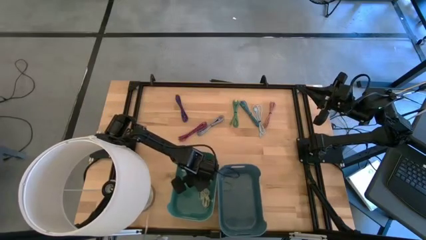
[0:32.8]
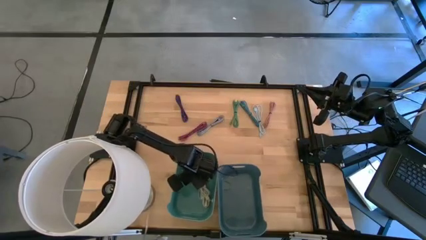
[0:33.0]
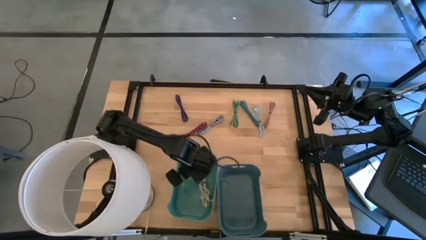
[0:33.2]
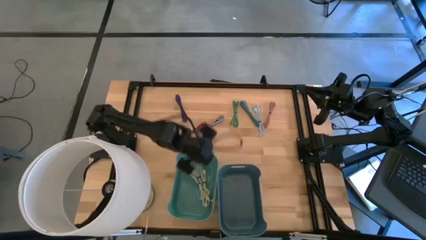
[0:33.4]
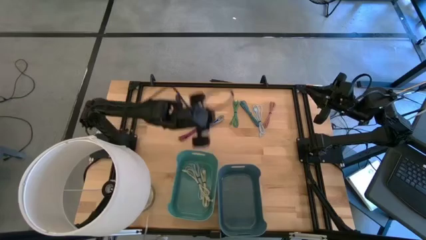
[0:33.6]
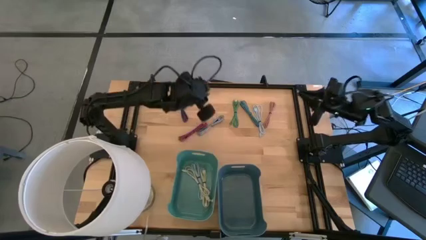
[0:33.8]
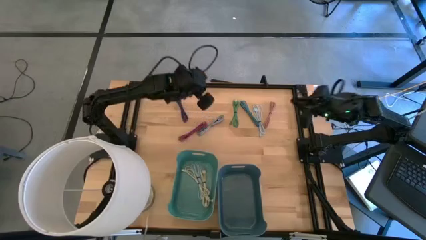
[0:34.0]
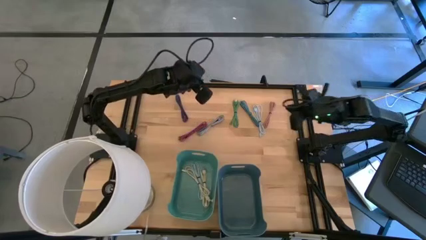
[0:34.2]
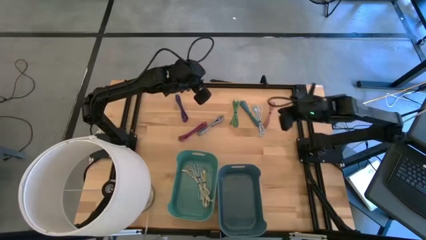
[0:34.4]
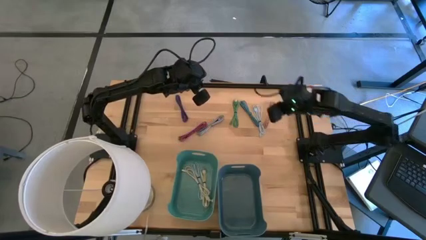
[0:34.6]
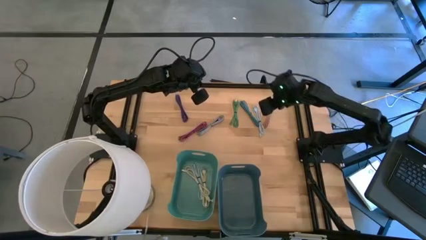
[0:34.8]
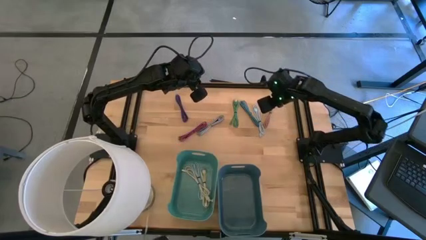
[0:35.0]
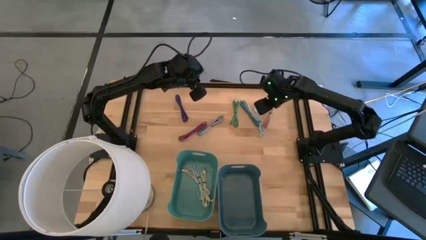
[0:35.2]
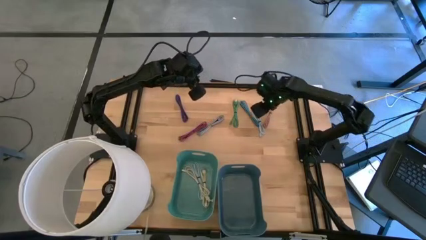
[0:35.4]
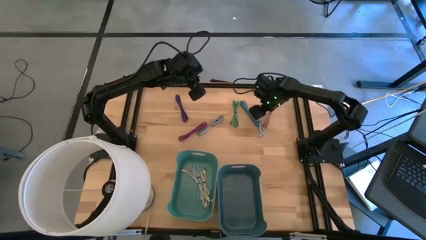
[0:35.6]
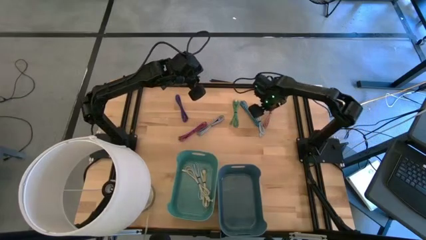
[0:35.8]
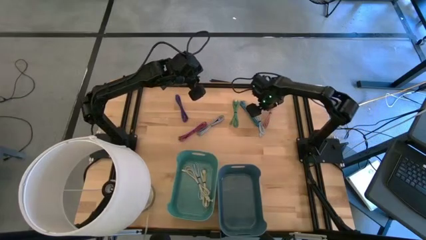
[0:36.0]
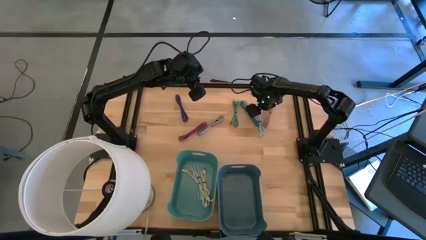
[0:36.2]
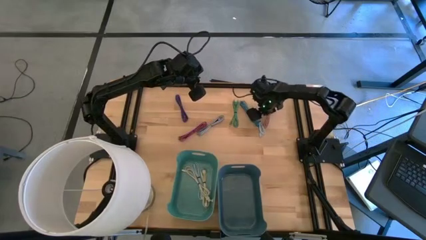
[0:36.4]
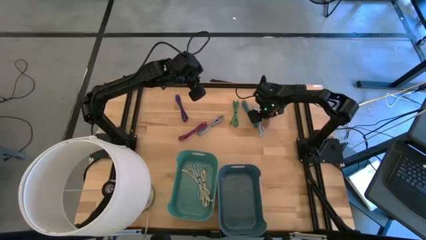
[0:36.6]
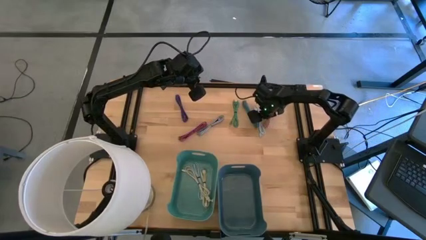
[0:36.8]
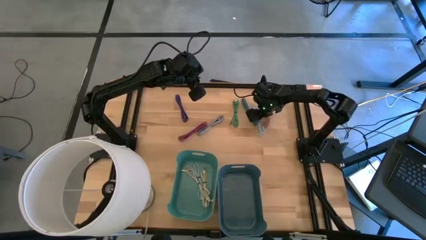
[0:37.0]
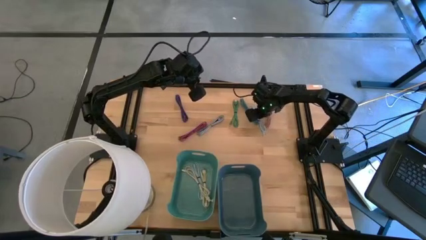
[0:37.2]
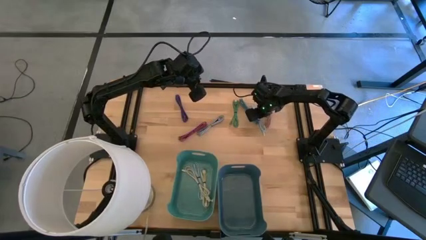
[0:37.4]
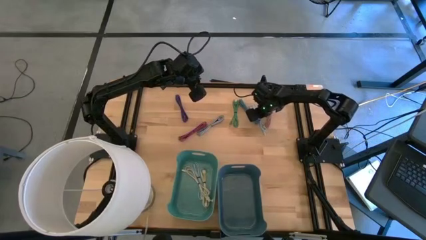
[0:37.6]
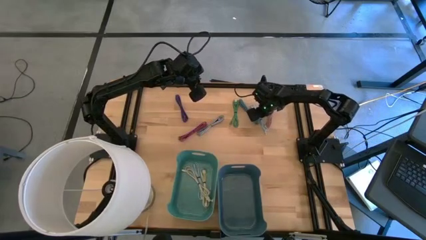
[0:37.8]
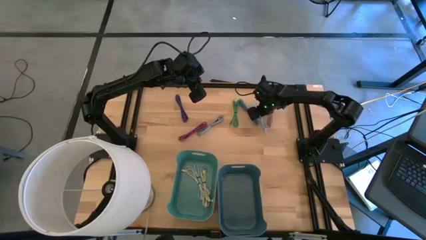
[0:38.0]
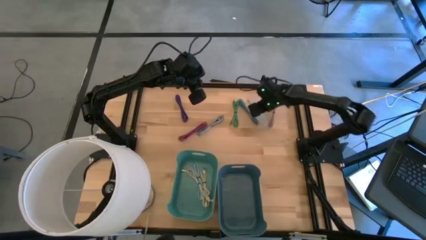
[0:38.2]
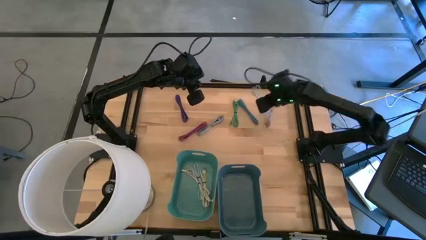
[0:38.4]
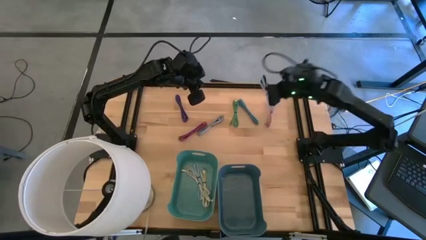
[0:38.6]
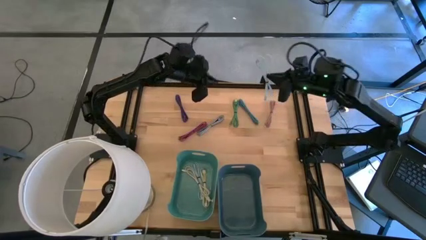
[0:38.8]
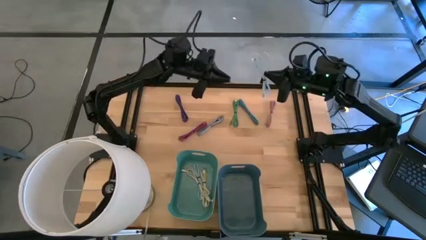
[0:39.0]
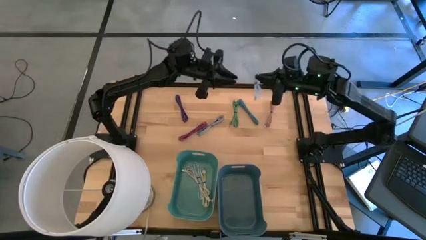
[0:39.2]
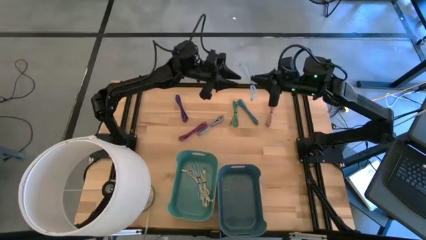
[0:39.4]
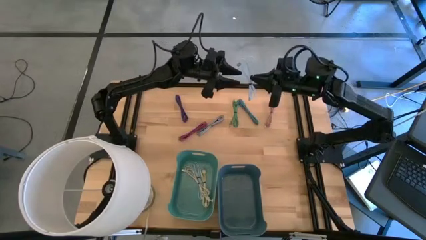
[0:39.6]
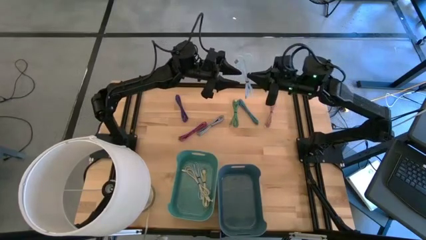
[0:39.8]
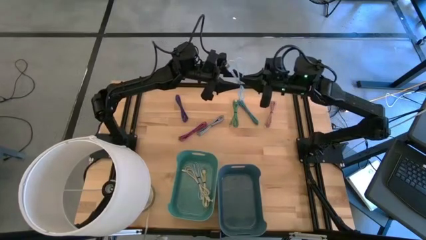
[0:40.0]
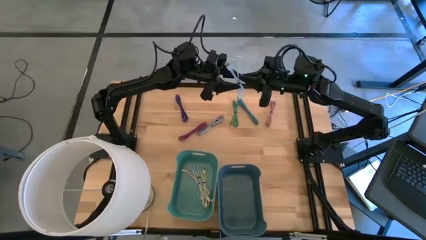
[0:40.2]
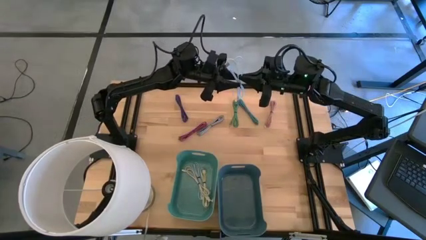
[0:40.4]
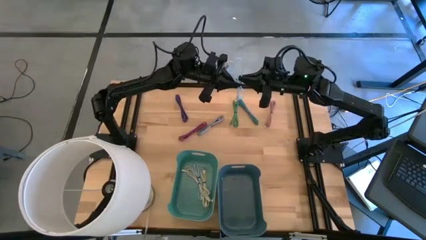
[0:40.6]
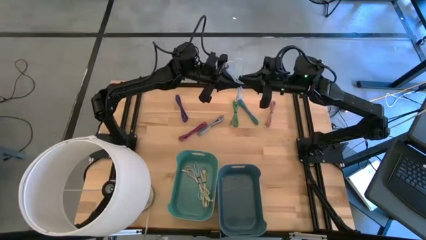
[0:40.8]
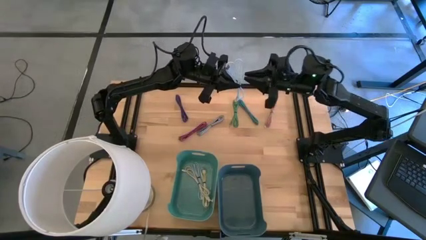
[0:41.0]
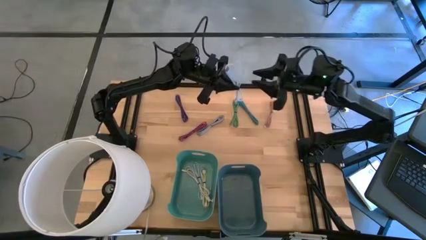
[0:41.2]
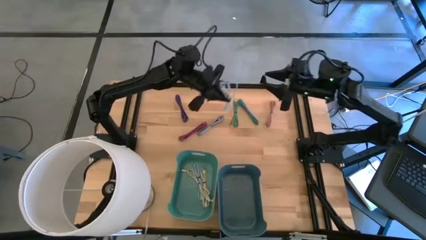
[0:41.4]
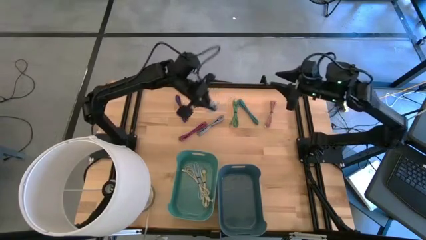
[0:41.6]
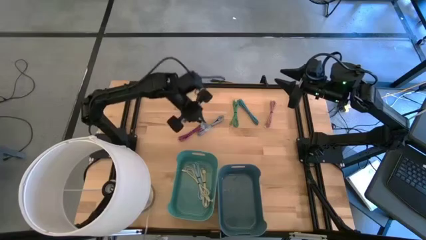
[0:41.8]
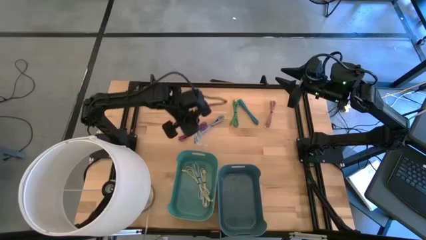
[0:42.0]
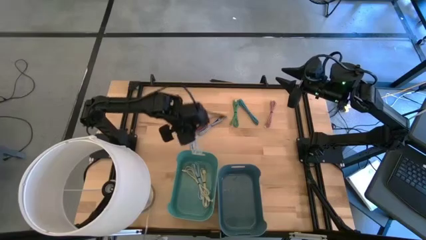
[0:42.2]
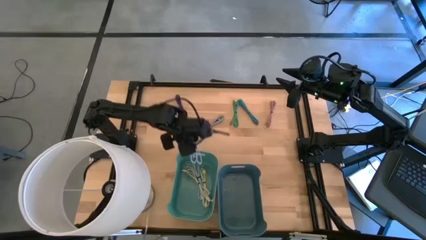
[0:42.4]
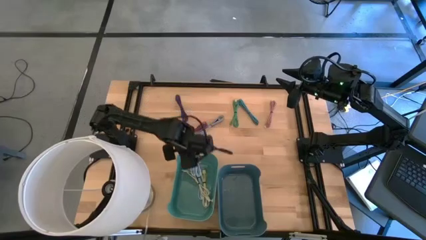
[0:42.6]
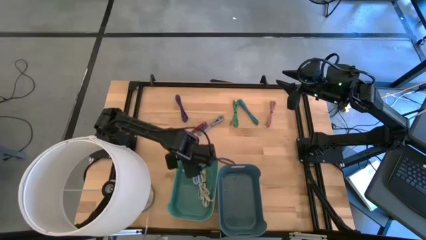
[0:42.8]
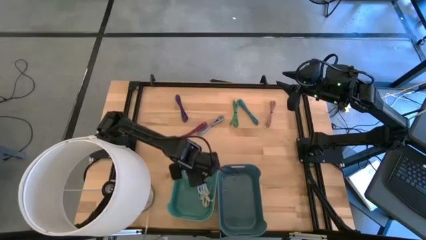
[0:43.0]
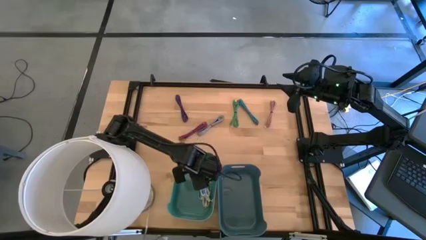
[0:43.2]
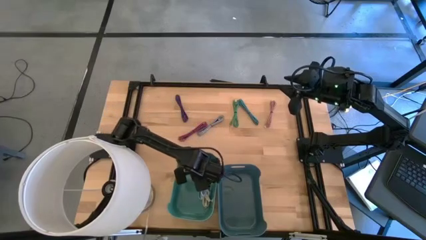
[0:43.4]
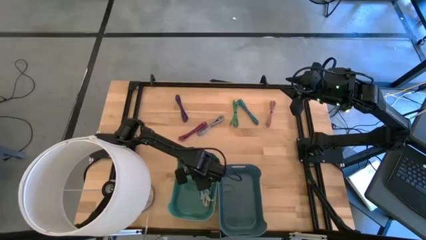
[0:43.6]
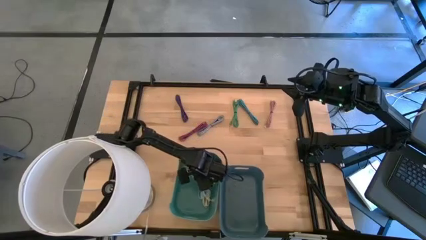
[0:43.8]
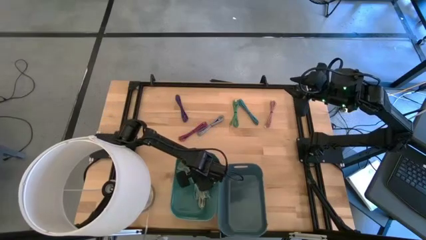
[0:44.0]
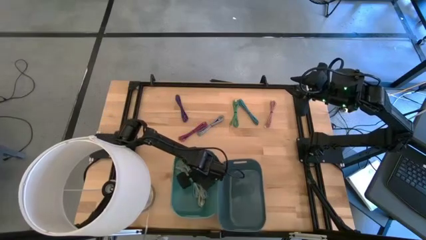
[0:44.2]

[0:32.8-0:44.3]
Put the light blue charger cable into the green bin

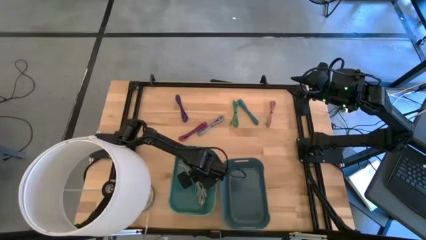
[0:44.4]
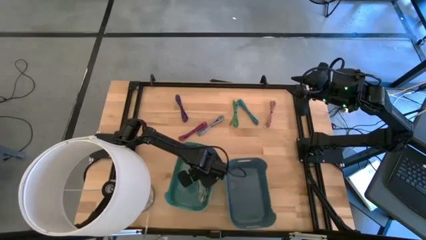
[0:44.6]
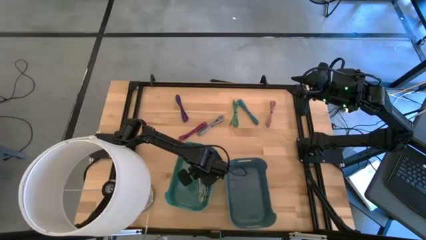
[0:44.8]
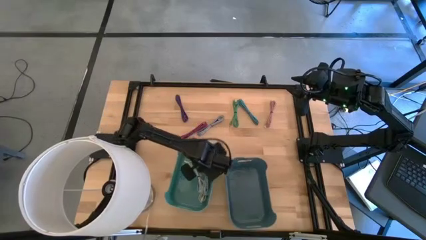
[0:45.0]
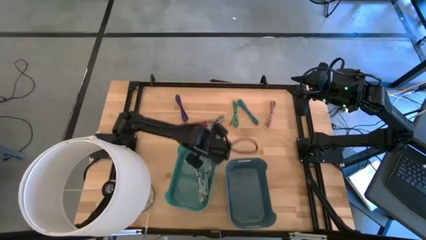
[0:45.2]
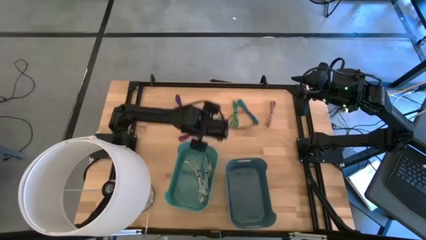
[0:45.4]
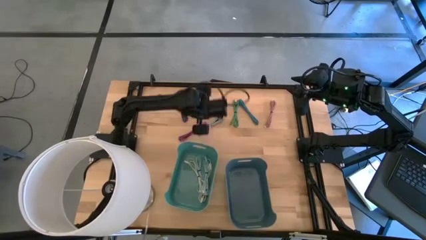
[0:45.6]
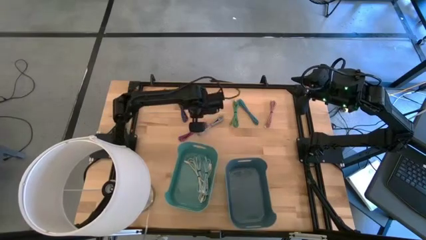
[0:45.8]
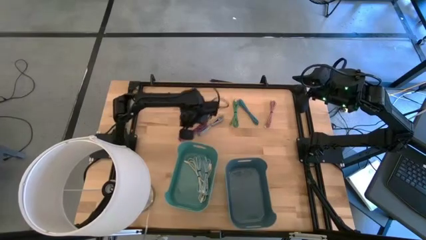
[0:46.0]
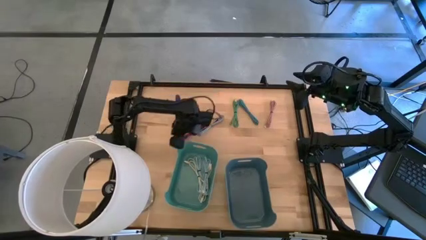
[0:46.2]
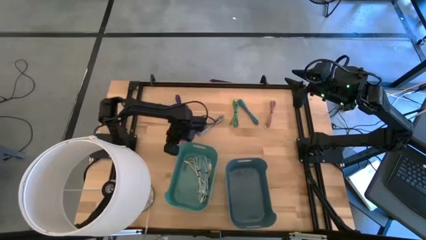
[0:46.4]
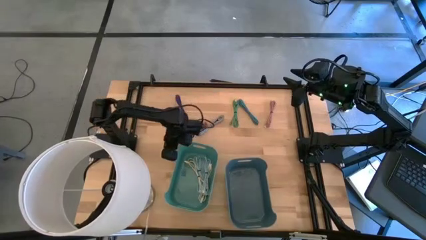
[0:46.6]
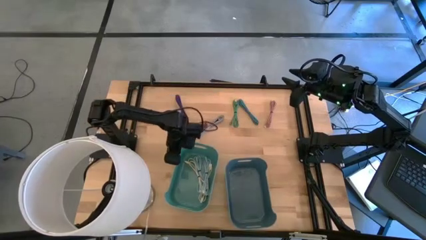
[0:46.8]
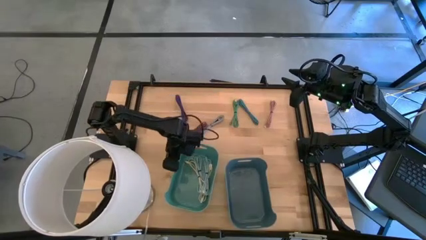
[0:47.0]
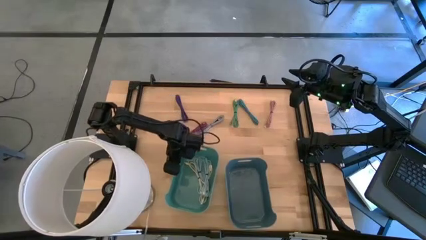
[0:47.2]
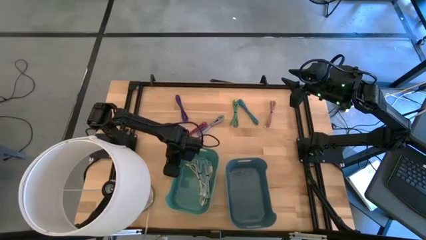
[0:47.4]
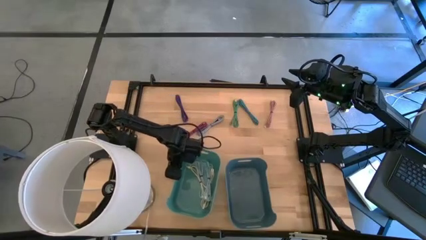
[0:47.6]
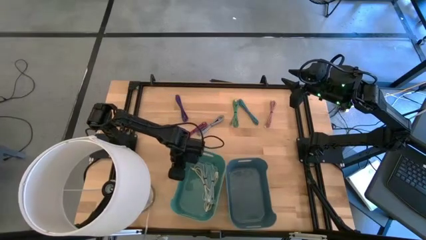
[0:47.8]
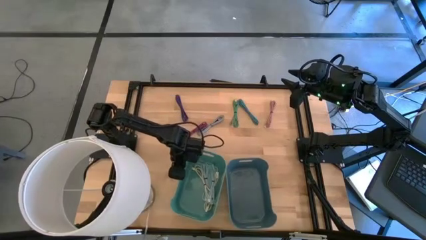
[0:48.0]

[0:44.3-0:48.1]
Adjust the green bin
